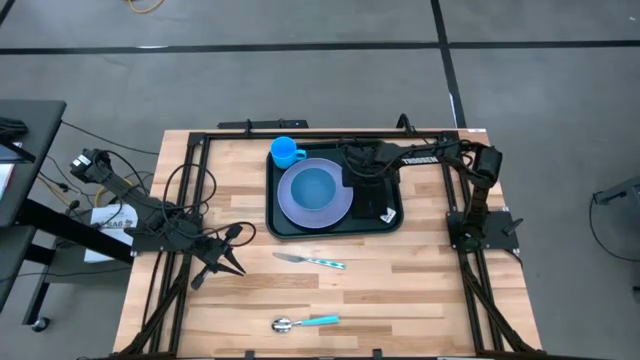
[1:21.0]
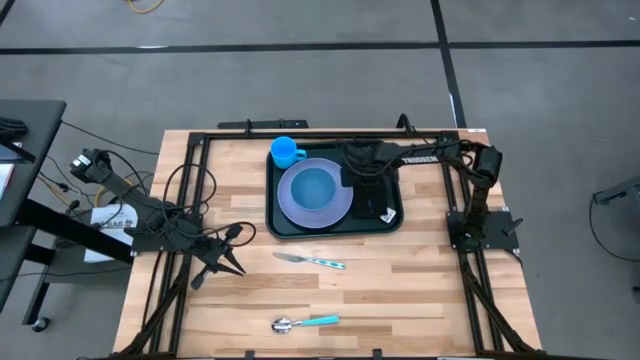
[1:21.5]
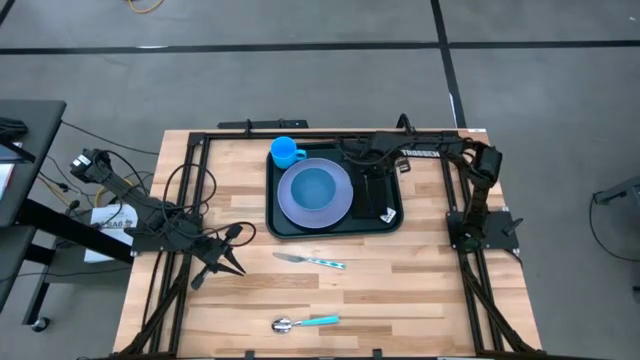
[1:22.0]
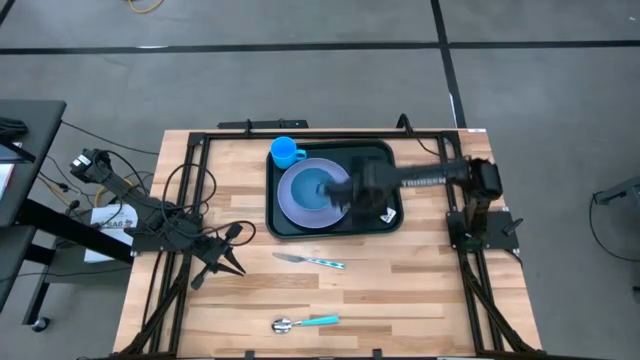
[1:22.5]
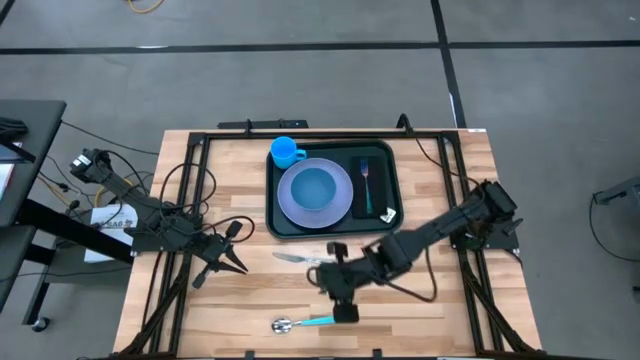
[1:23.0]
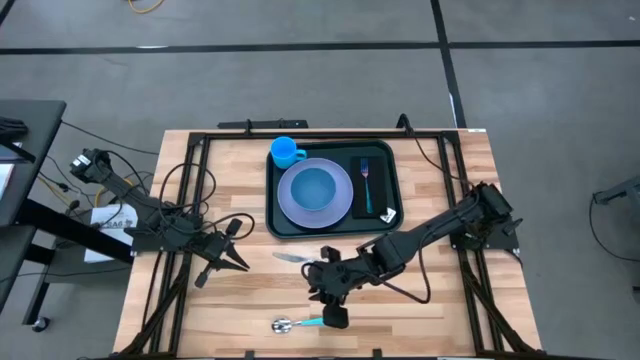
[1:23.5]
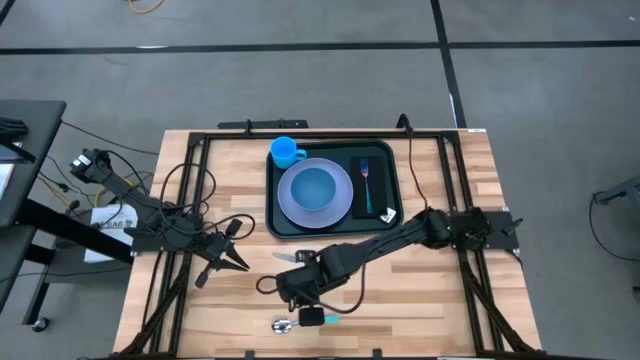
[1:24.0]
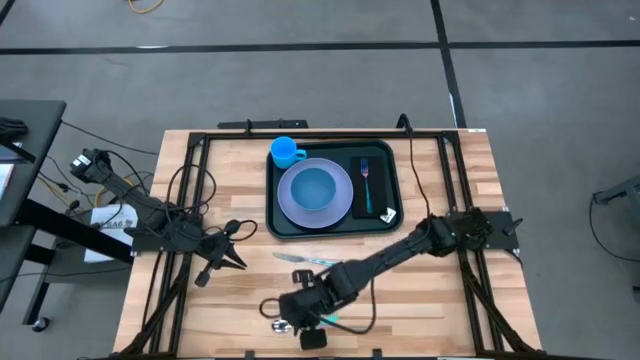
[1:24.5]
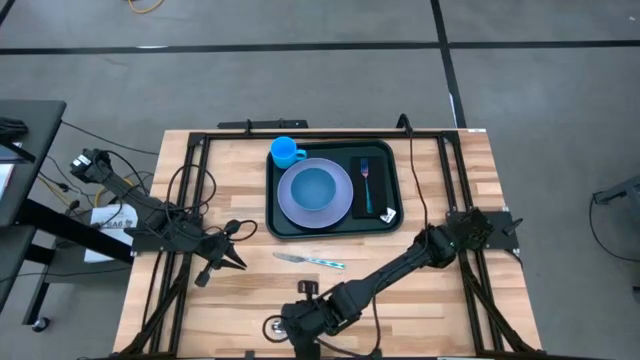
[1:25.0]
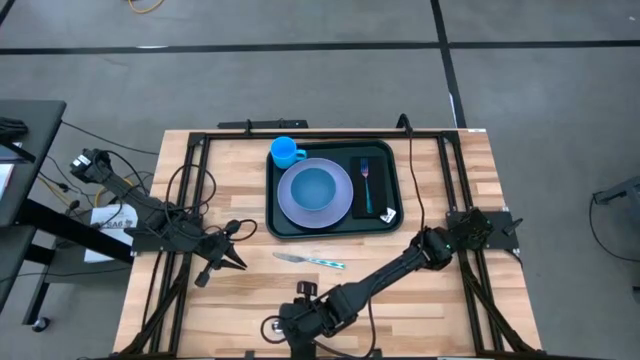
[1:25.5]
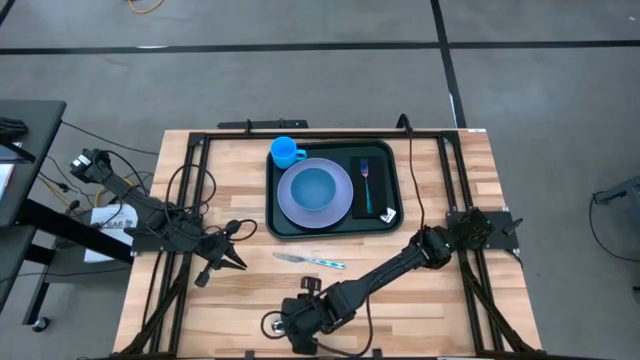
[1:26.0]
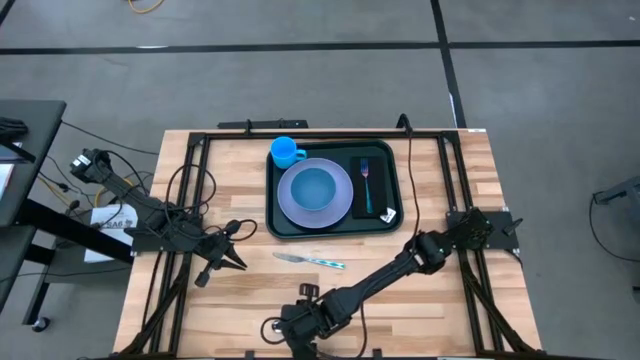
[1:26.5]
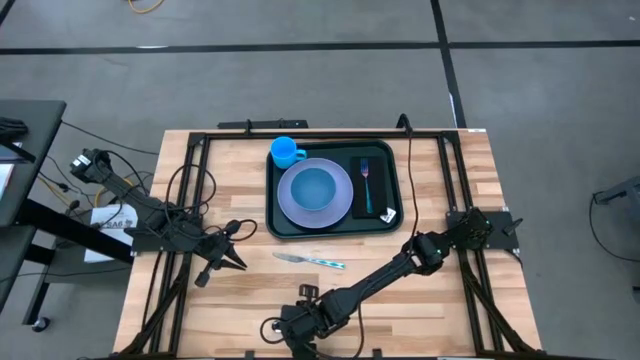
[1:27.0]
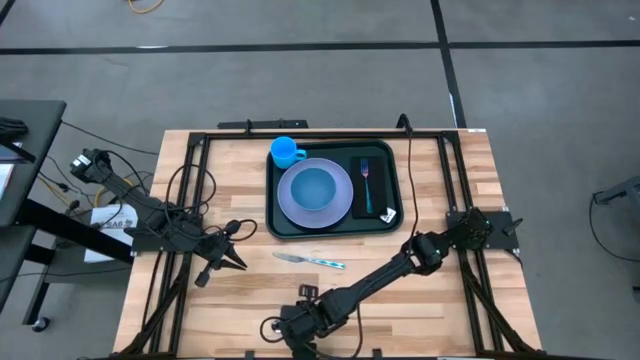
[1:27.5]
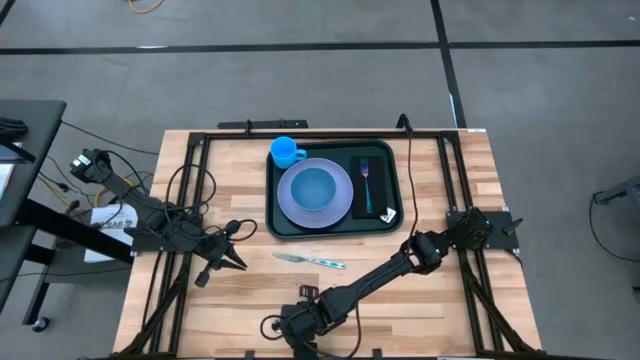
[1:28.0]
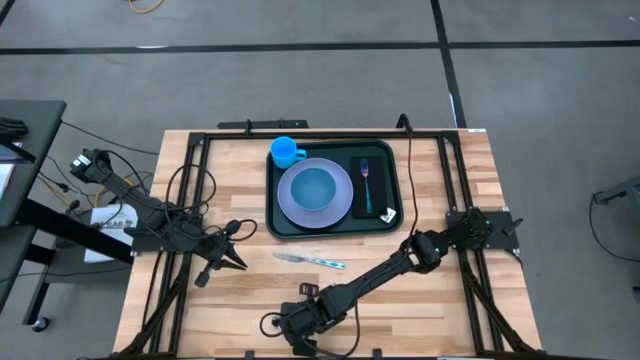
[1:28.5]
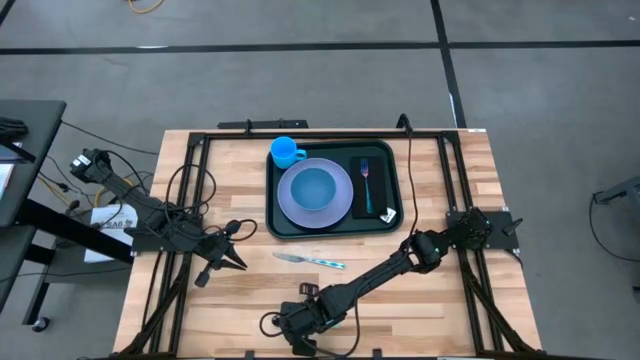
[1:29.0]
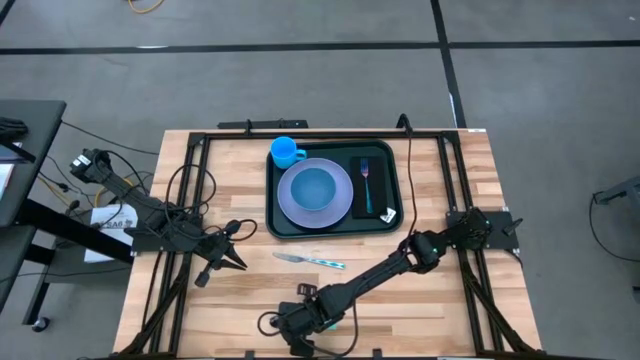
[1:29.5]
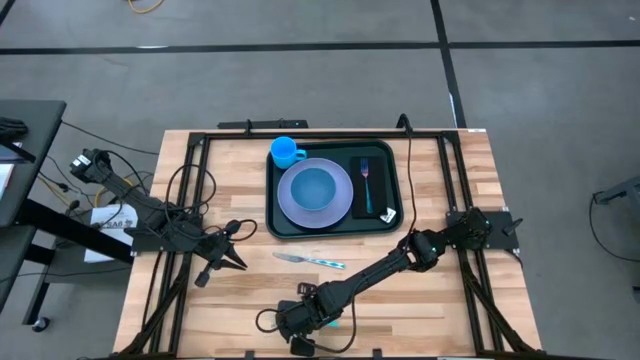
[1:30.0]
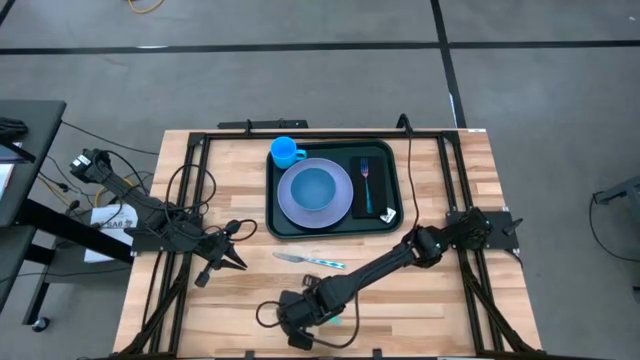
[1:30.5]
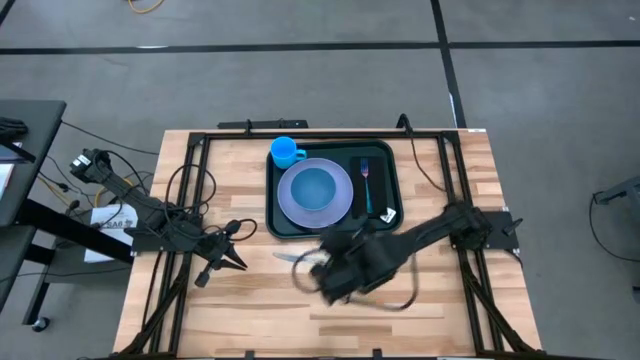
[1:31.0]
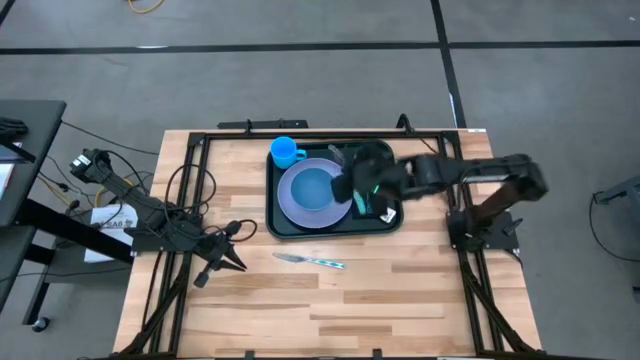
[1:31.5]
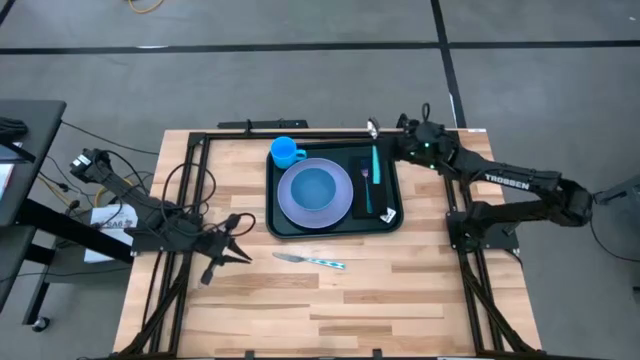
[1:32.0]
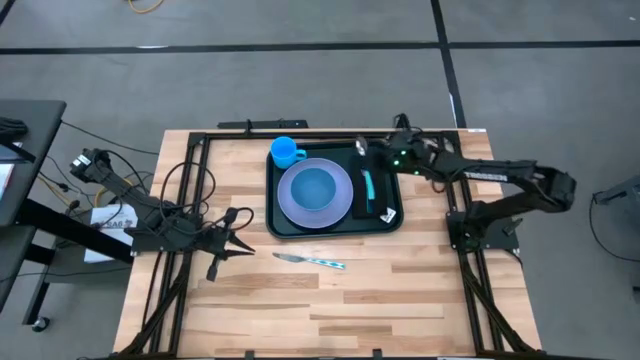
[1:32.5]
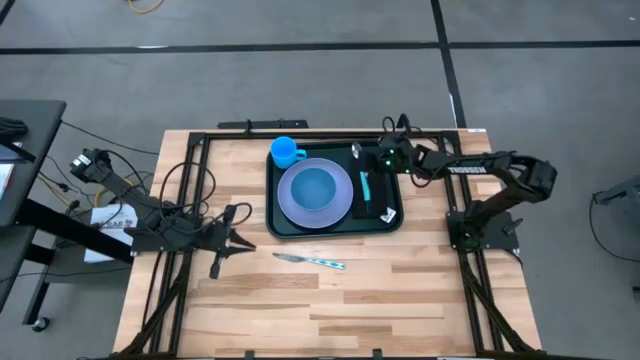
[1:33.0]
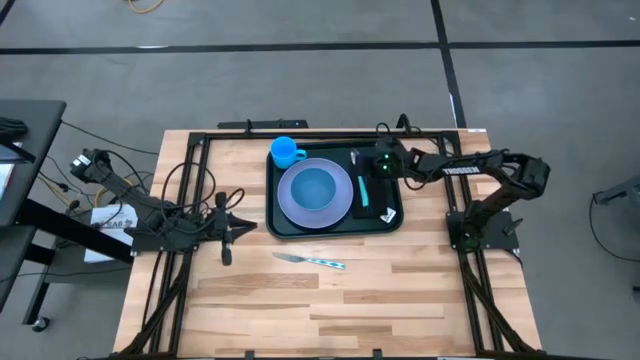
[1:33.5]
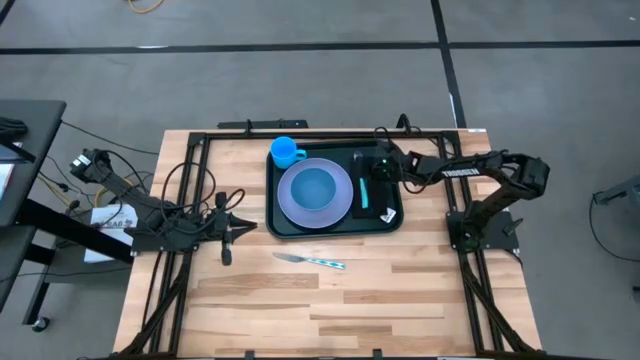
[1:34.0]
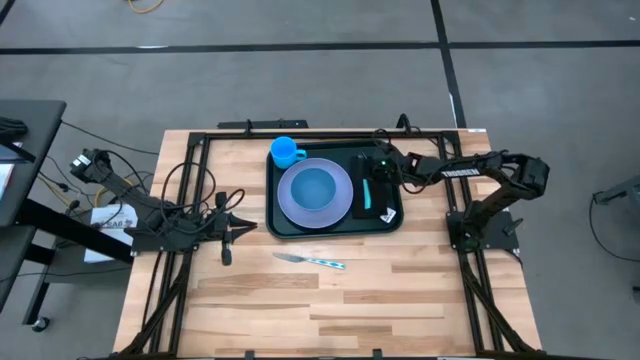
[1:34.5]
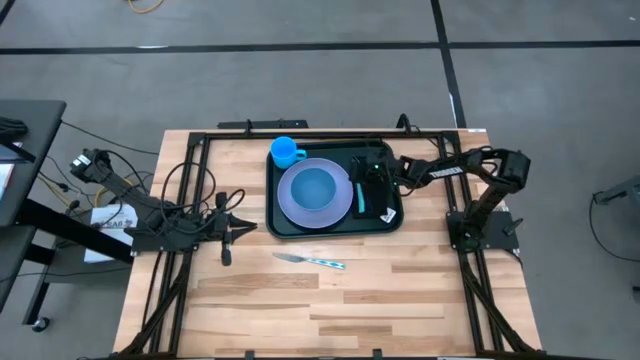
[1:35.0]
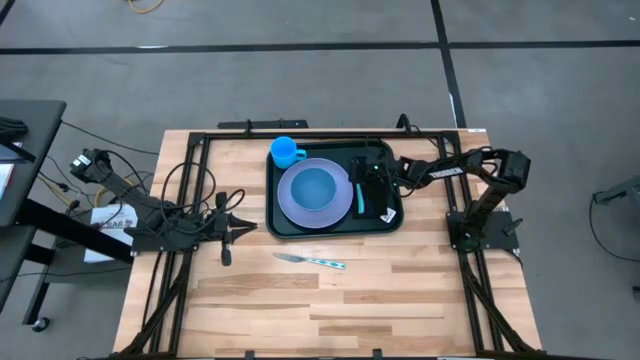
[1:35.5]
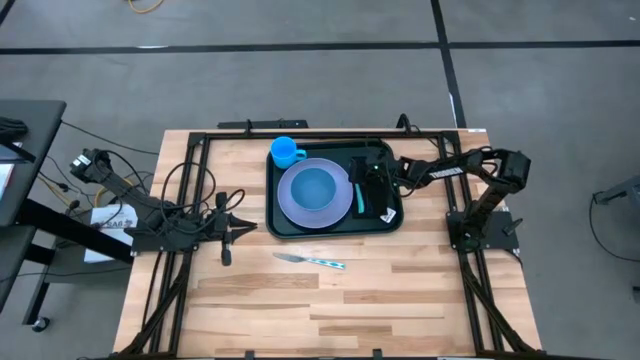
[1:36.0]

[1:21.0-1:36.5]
Task: Set up tray
Put the blue spoon on the black napkin

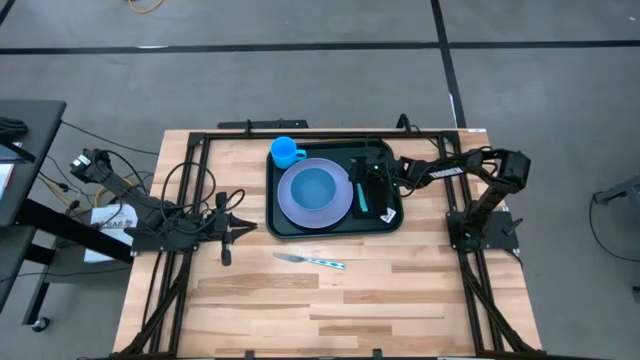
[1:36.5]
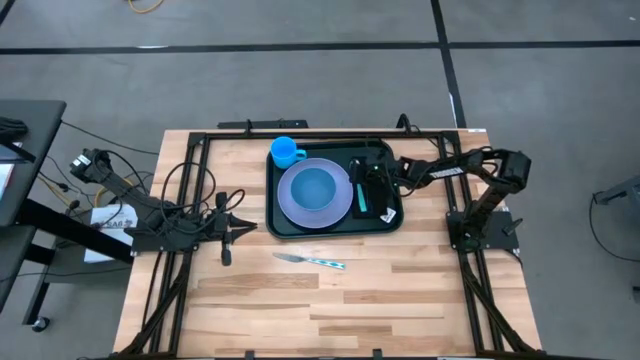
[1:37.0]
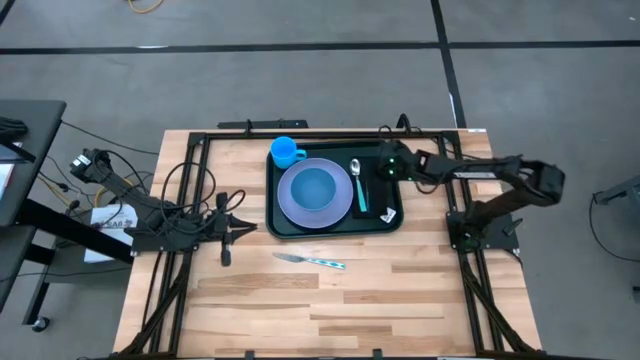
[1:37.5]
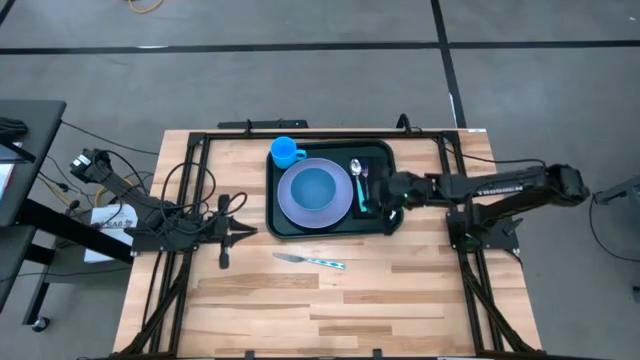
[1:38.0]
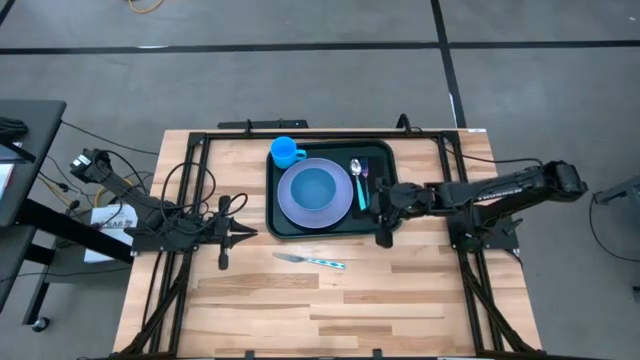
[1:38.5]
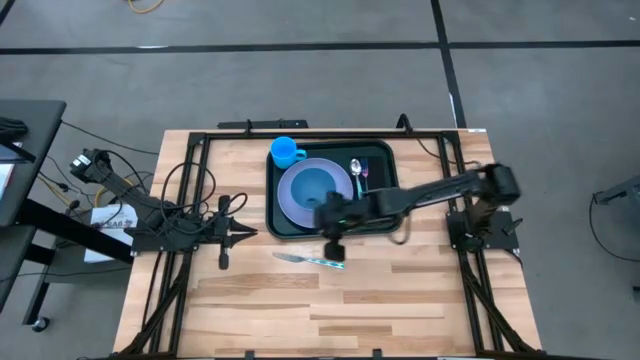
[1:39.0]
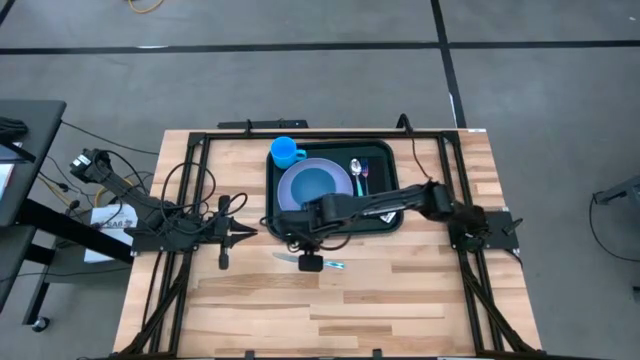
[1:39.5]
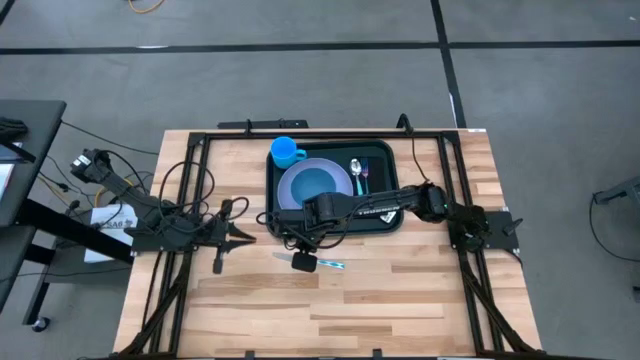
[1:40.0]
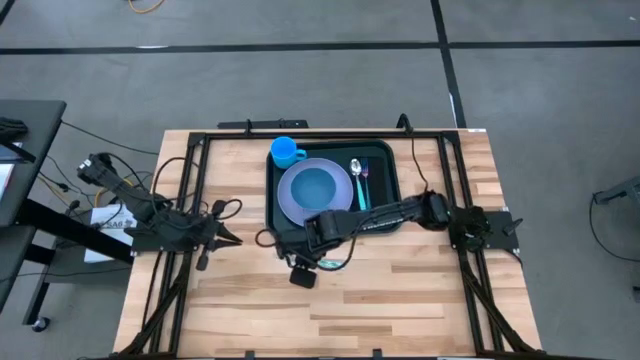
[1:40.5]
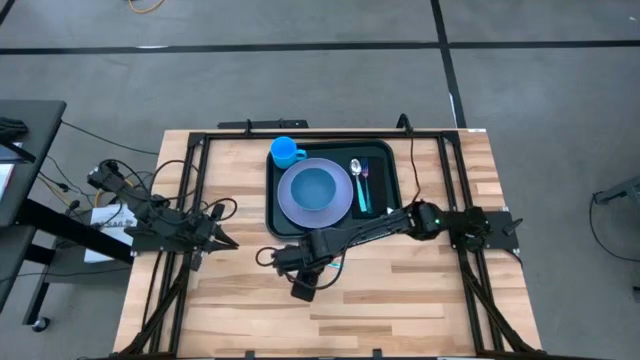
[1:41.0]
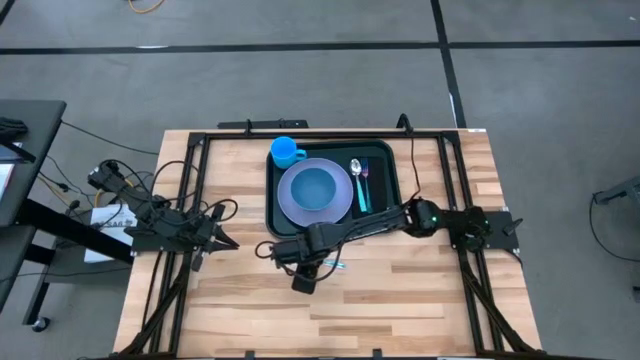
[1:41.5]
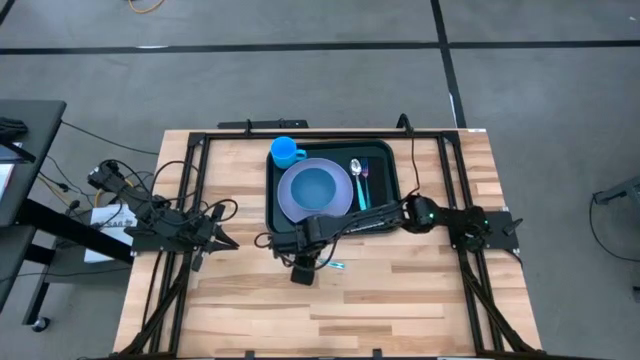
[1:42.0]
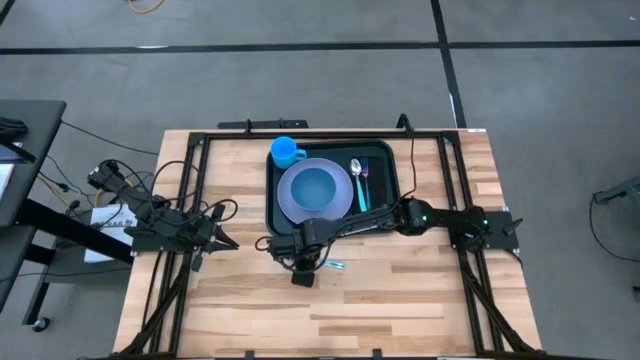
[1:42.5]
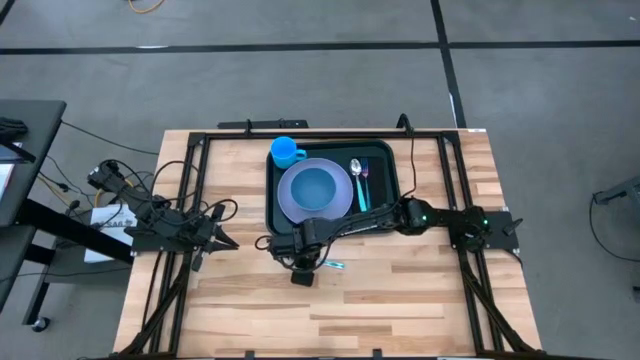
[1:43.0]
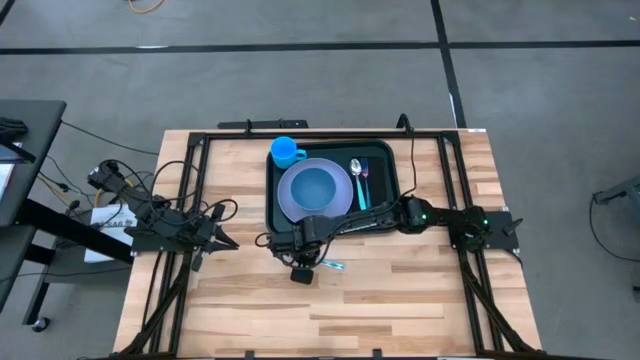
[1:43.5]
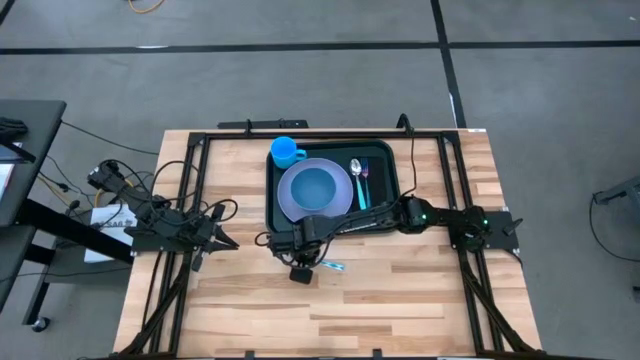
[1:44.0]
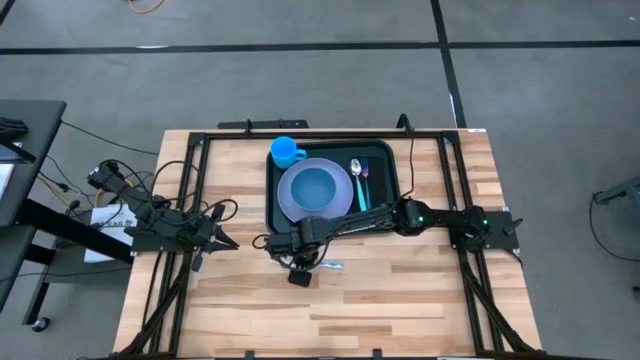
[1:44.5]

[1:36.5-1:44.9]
Put the white/blue patterned knife on the black napkin
